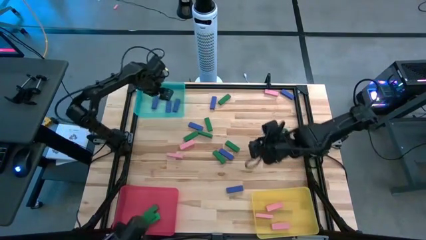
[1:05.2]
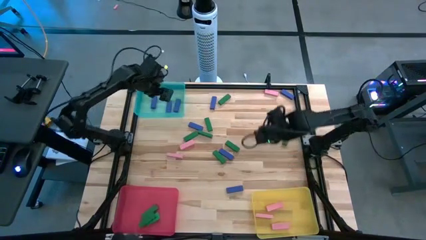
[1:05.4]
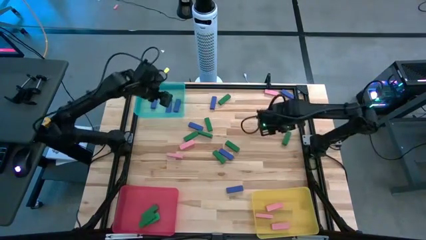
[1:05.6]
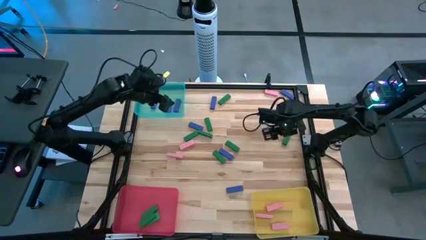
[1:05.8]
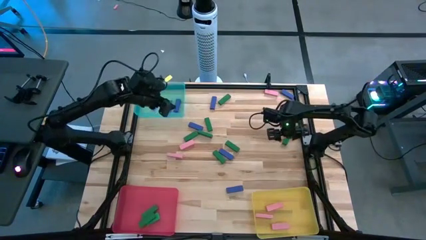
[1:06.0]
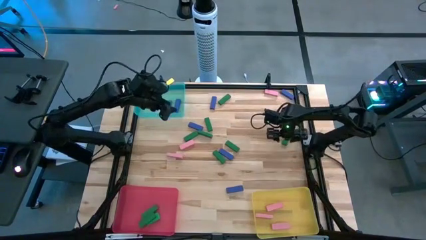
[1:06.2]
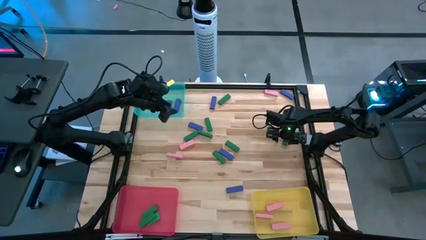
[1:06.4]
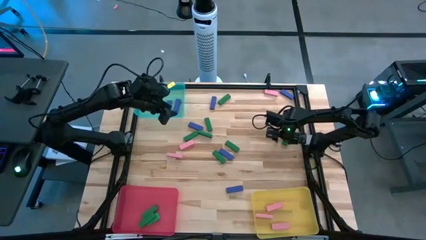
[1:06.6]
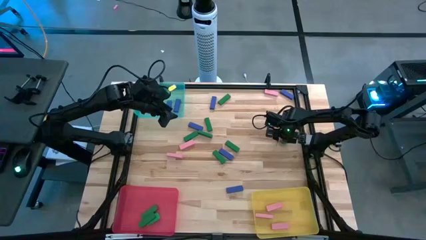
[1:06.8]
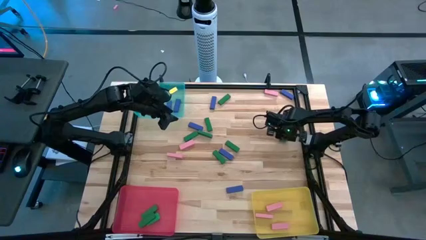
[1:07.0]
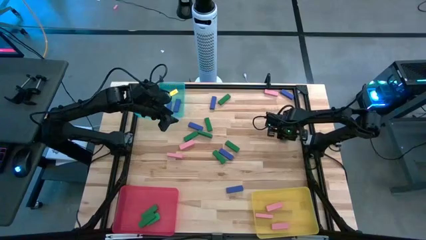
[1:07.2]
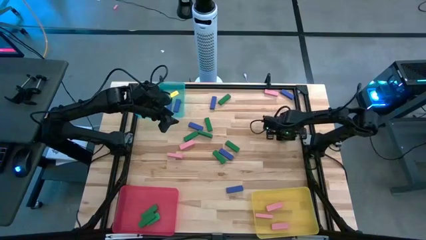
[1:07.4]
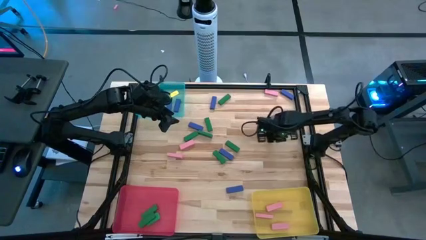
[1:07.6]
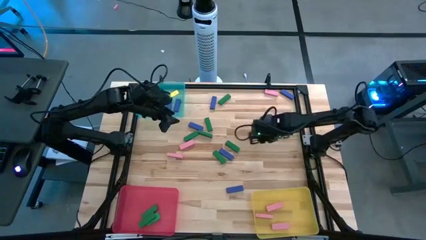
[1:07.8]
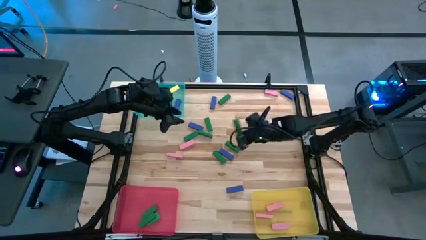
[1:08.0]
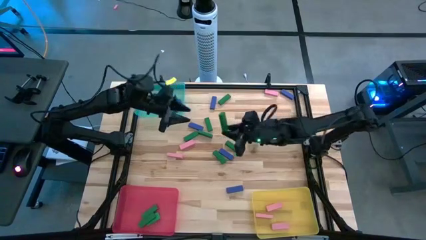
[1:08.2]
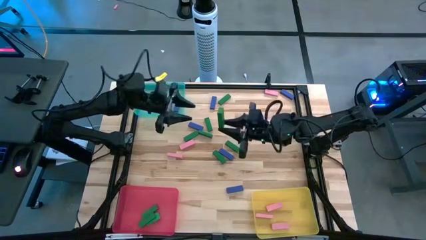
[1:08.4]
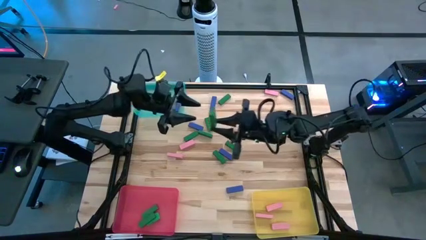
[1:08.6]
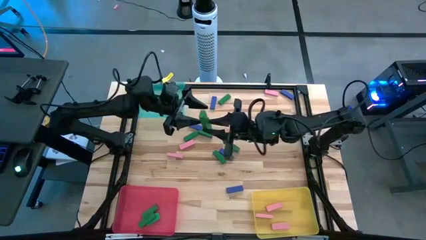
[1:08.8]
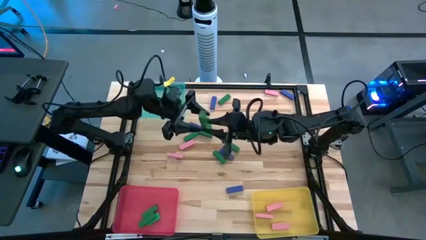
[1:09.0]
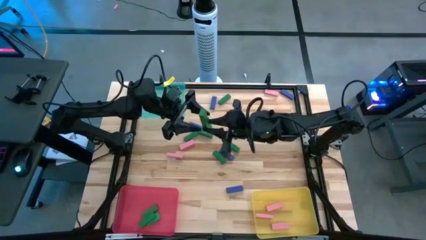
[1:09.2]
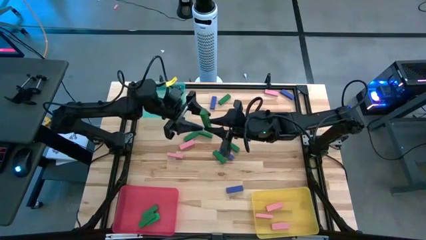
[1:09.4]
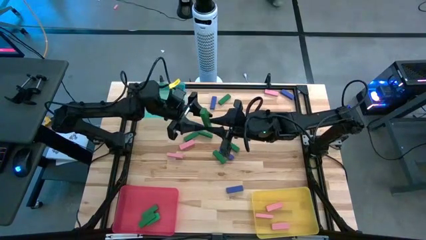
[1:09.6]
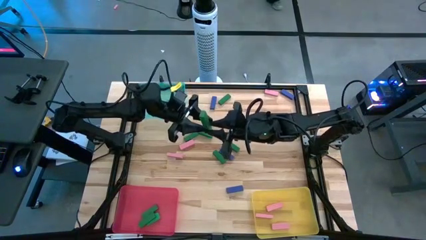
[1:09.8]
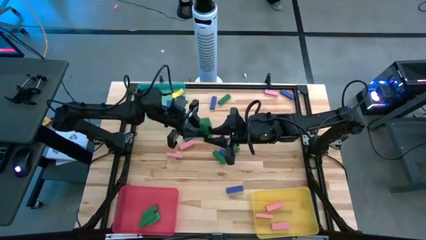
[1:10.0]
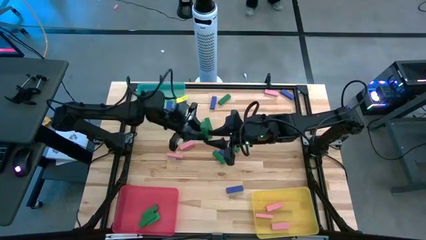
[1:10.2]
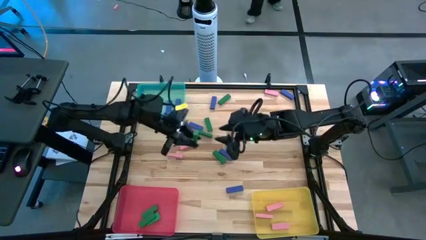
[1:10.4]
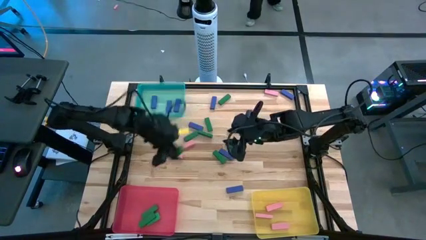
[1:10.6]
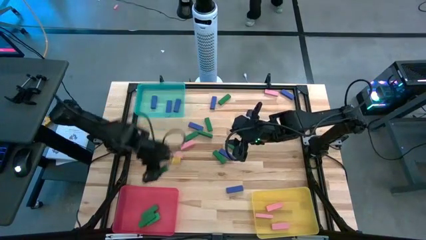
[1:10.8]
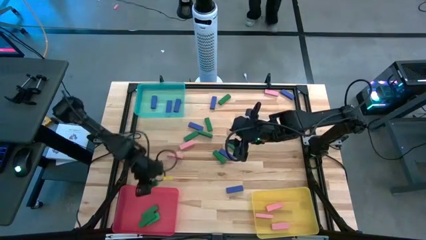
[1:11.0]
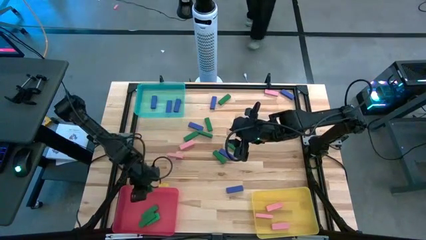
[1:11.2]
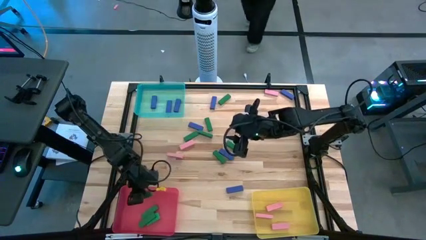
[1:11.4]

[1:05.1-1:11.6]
Task: Sort blocks
Put the green block into the red bin

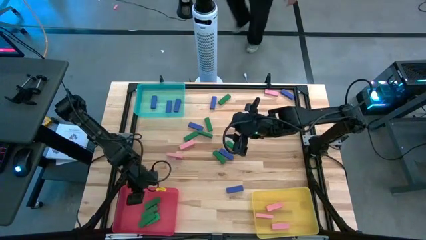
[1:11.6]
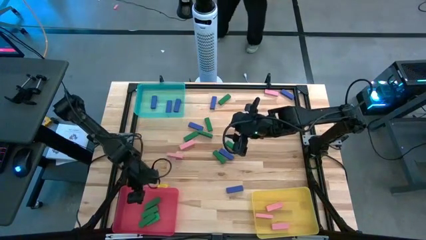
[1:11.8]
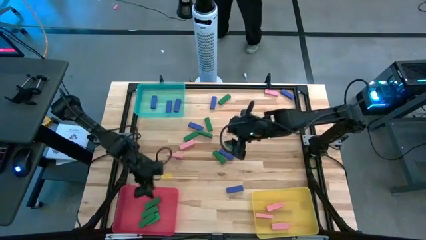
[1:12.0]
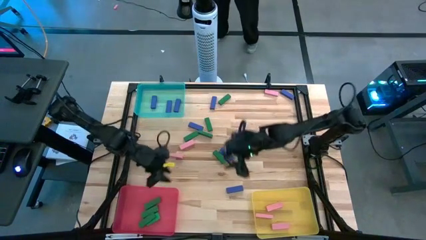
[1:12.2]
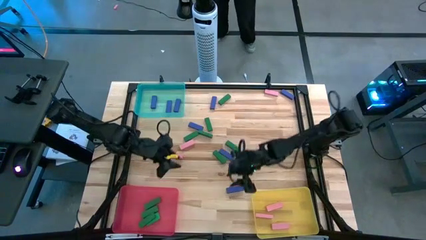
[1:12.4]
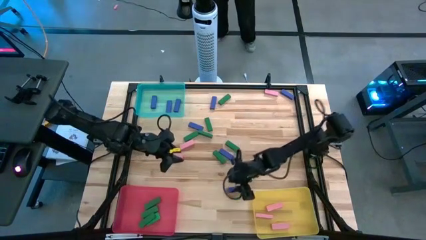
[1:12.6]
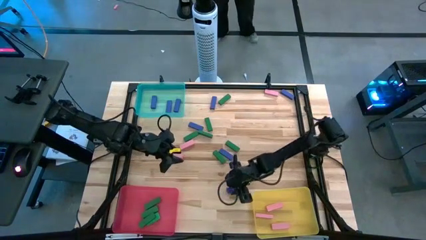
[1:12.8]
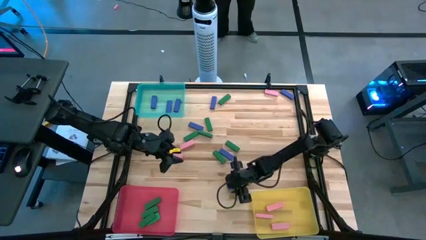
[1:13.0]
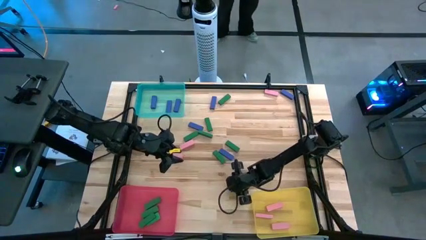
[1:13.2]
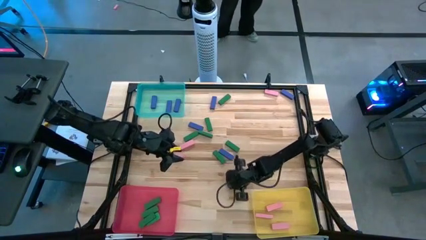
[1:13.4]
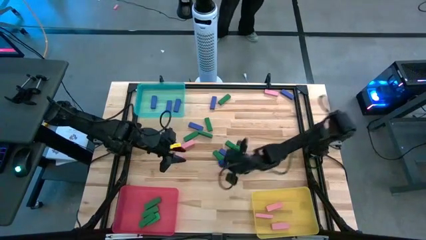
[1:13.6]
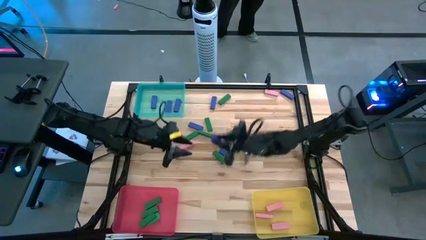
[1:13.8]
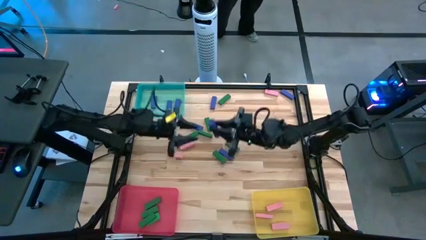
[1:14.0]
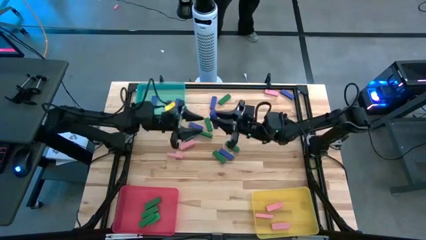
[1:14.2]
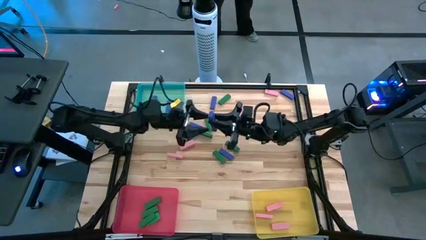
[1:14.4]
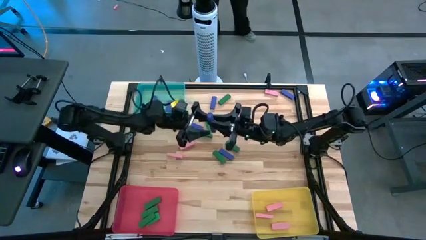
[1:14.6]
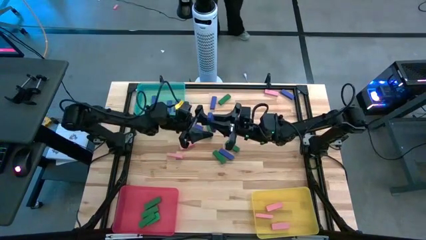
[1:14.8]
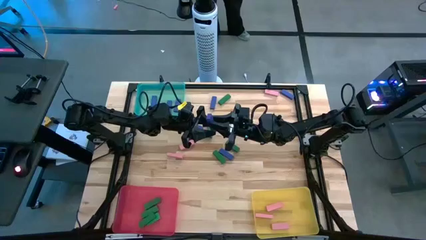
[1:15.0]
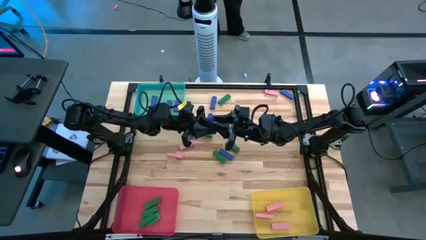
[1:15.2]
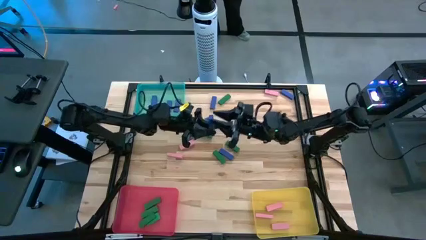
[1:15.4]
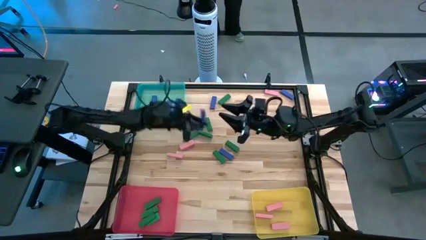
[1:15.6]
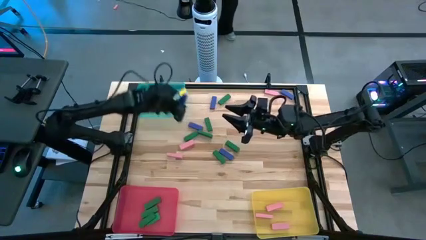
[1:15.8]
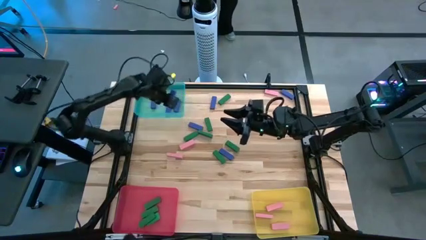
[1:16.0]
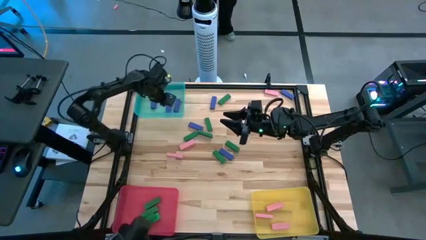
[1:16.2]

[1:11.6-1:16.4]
Put the blue block into the blue bin

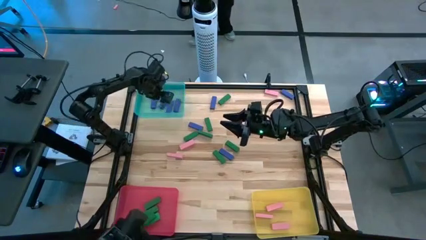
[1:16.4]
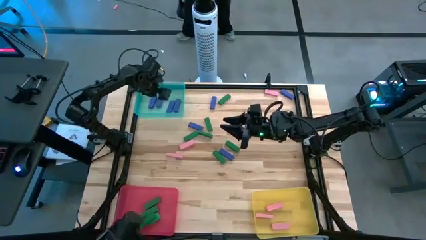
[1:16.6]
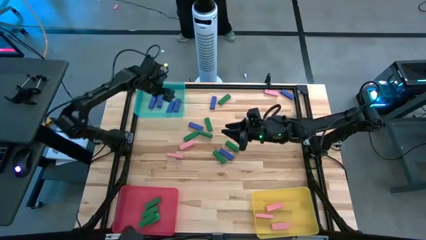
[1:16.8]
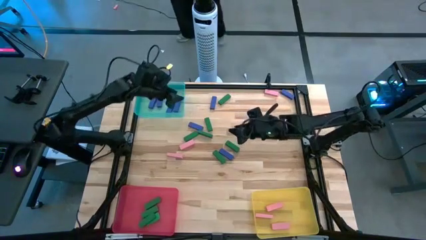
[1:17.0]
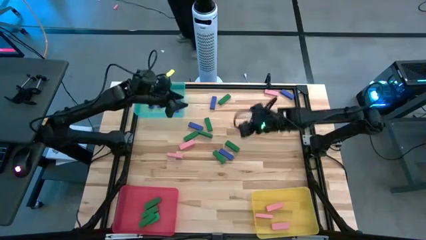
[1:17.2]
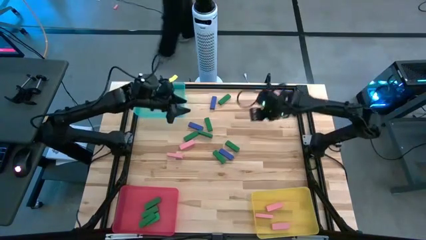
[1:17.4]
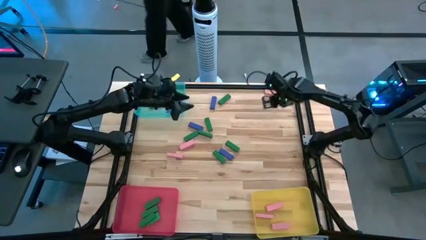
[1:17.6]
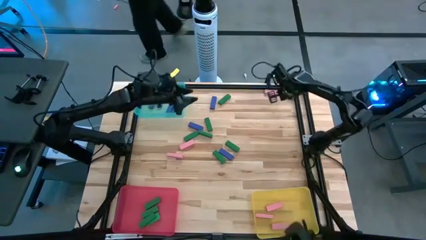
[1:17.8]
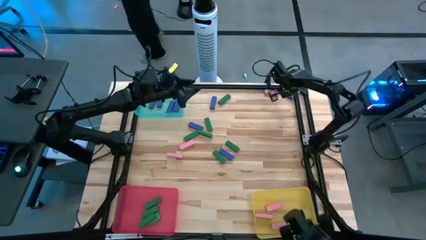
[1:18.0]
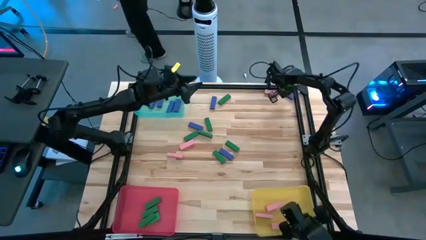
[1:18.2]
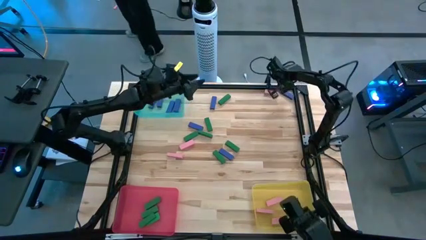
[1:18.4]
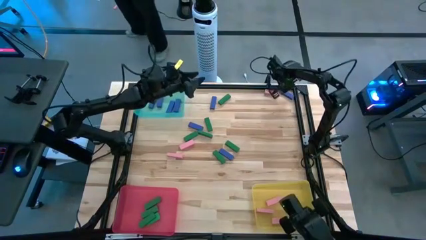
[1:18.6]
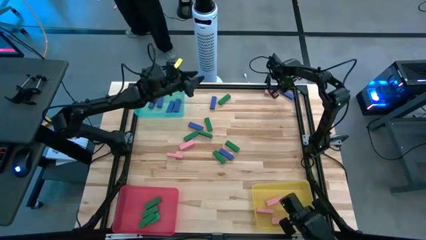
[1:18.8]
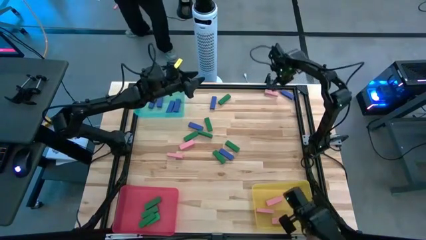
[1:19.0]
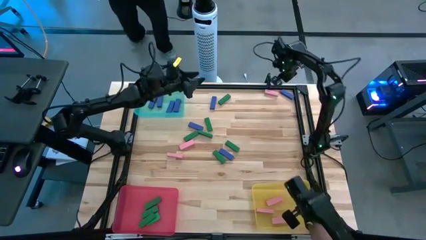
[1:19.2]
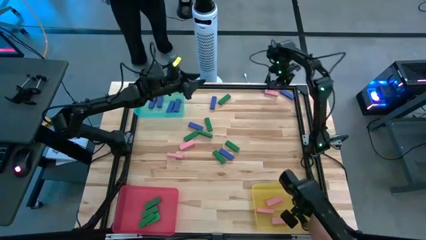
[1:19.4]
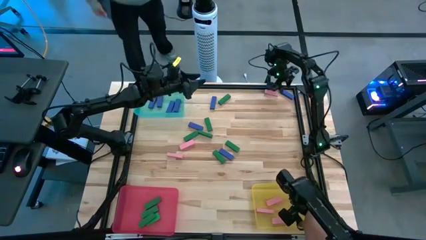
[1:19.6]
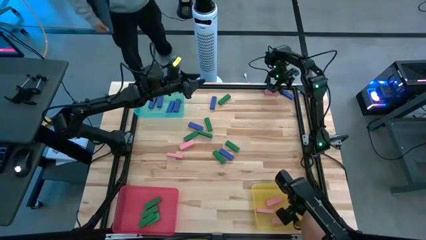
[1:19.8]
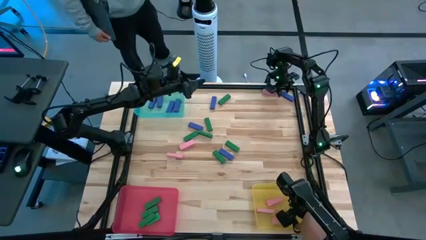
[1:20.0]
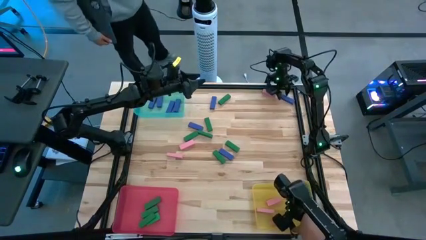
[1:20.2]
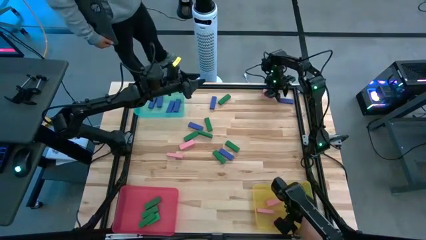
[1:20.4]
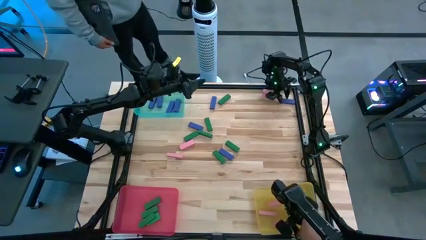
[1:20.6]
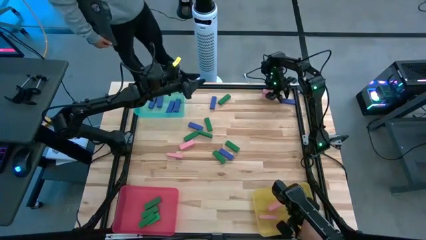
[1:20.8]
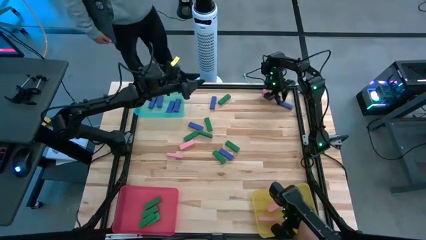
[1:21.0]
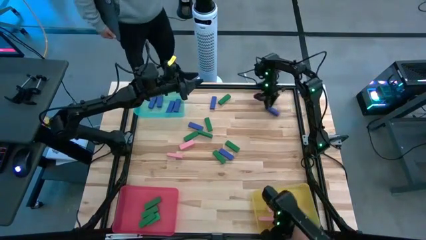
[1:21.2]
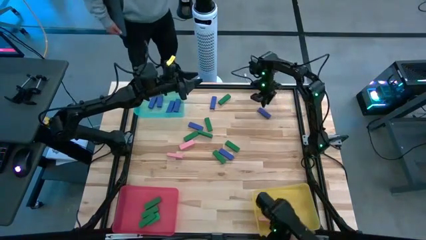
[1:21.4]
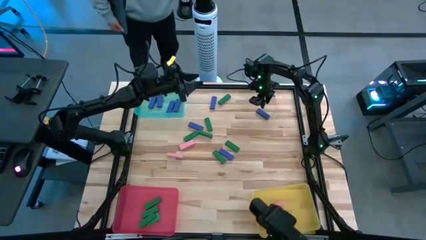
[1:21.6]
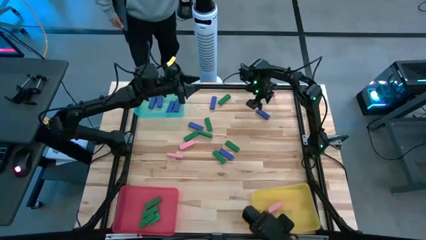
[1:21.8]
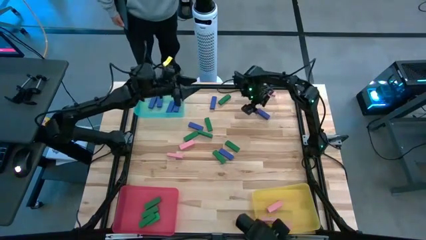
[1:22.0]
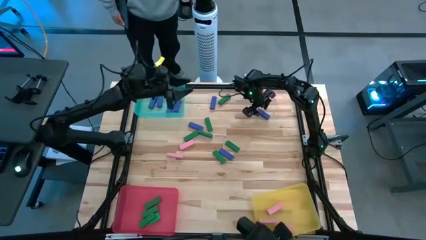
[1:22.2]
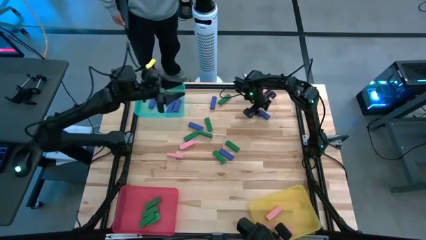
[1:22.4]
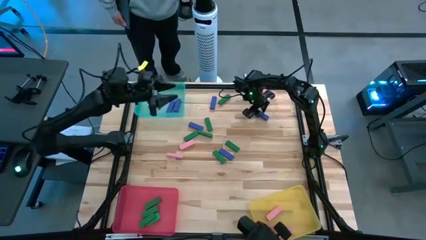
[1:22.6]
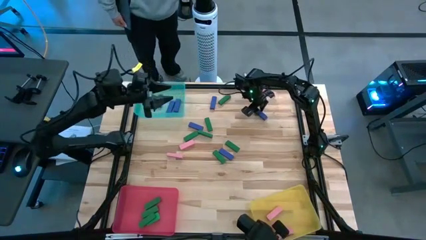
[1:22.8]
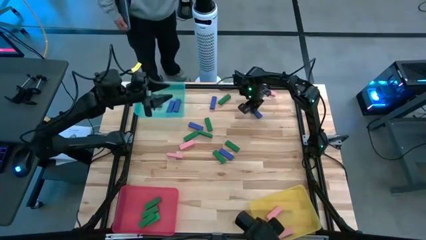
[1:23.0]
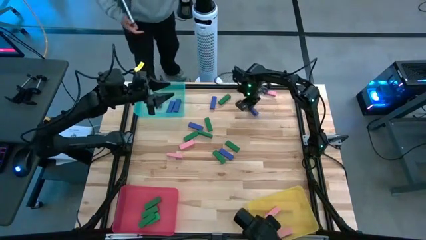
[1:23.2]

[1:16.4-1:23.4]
Put the blue block into the blue bin
